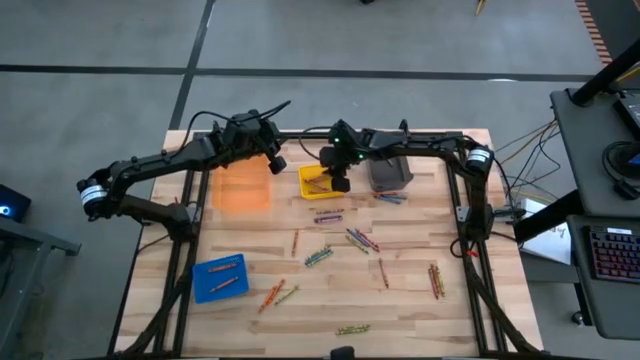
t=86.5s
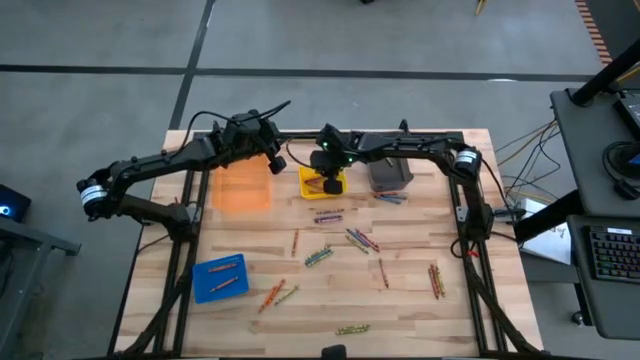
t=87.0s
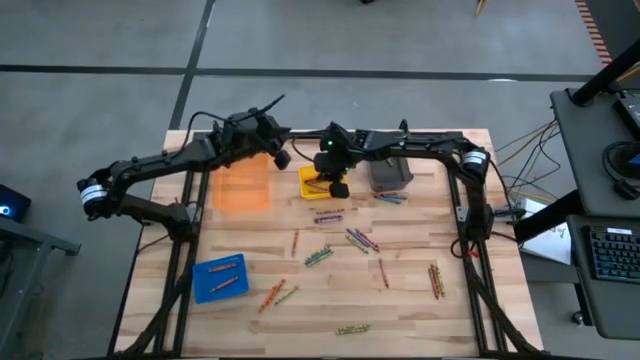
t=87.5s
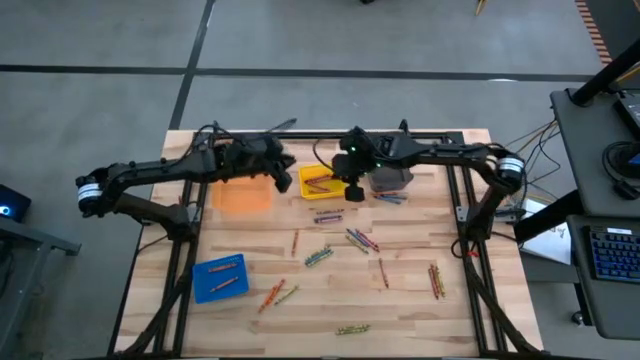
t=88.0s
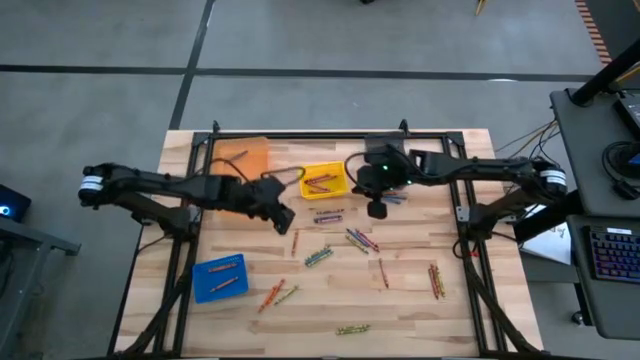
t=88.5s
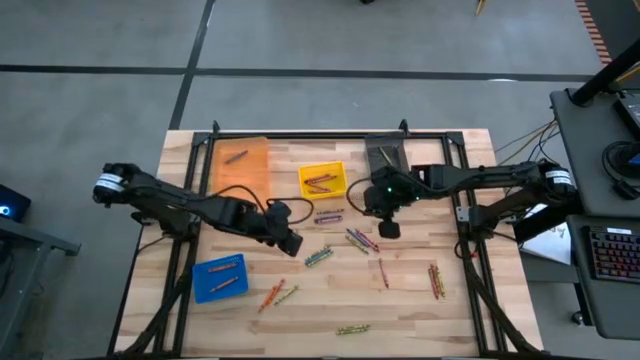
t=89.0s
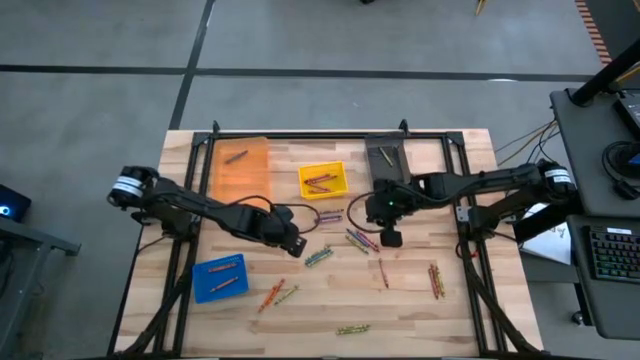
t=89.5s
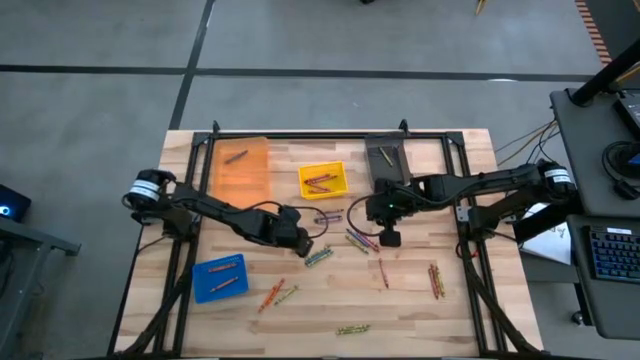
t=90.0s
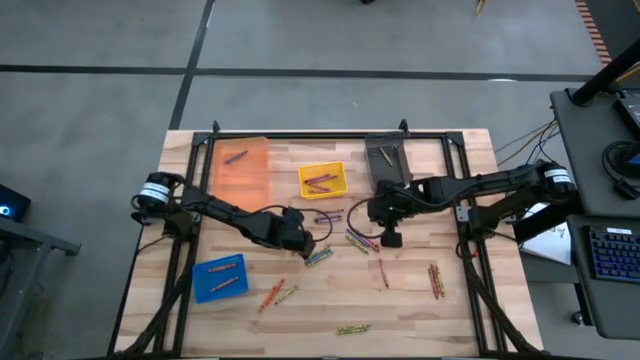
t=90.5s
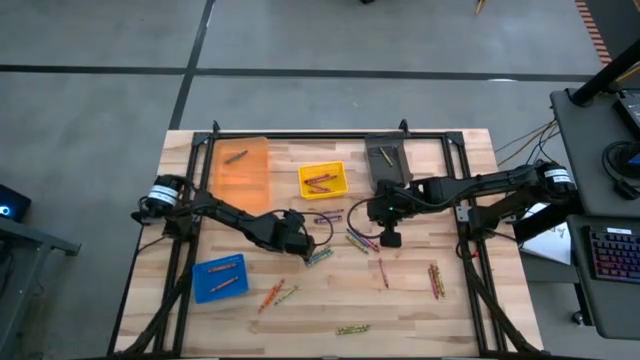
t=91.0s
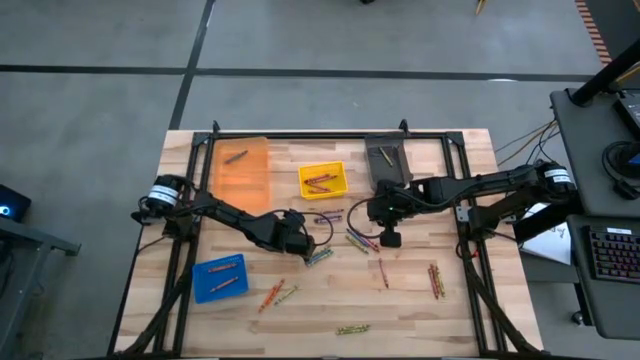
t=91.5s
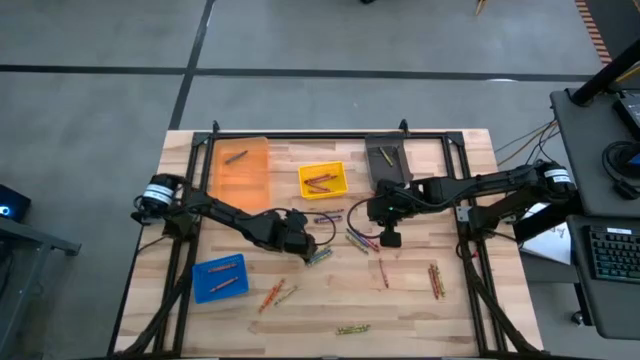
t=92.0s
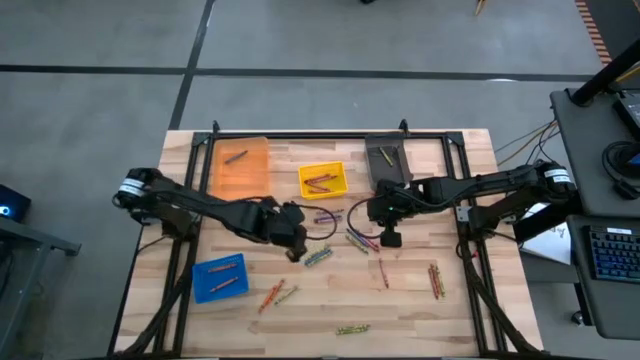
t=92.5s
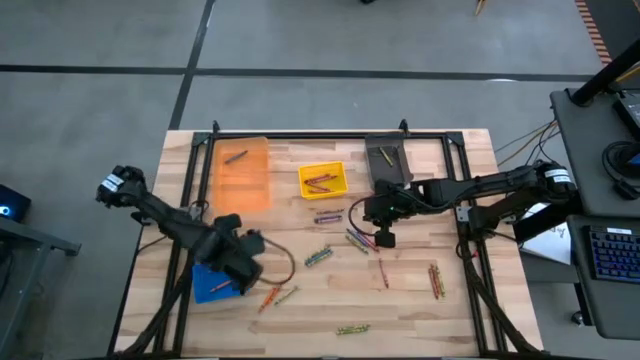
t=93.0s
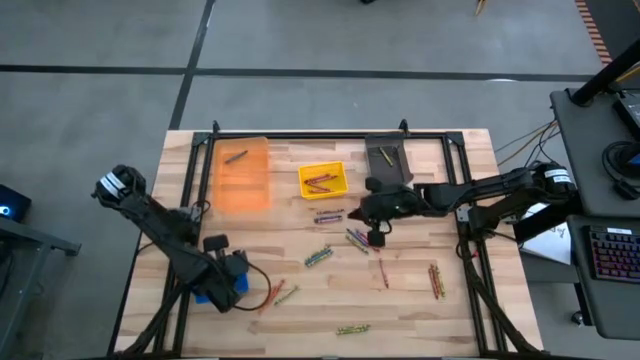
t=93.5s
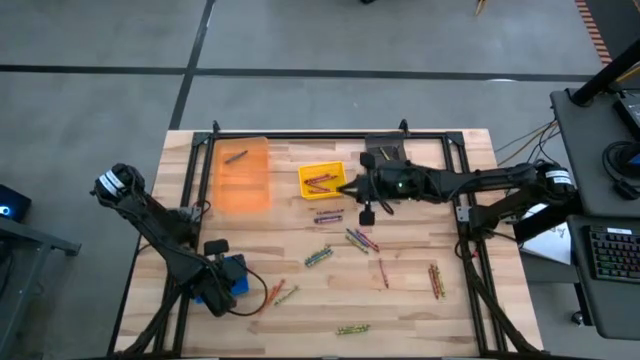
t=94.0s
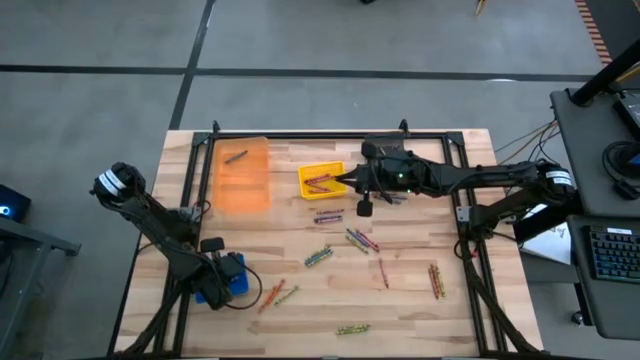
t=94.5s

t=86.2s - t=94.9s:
Task: Sort crayons
Put the orange crayon into the blue bin

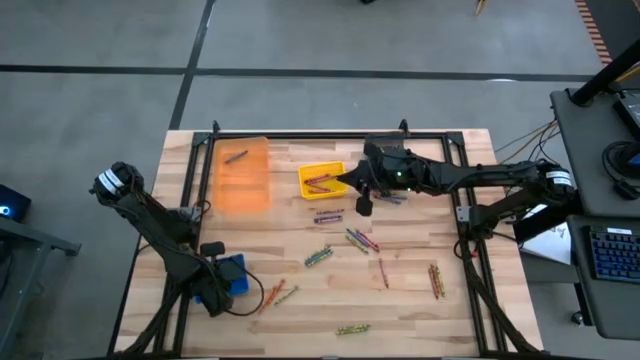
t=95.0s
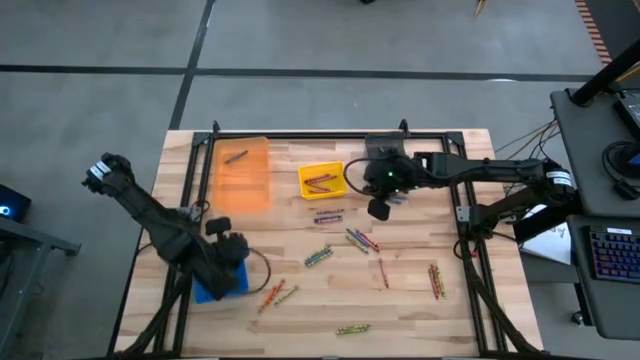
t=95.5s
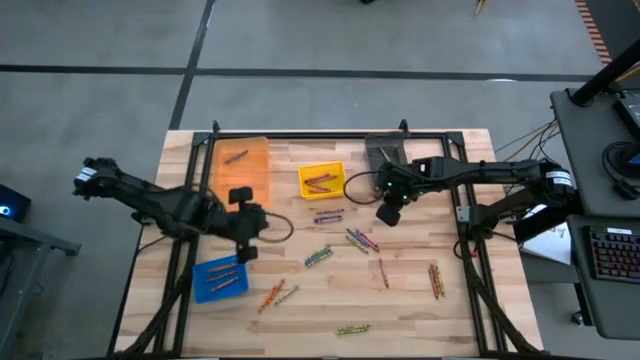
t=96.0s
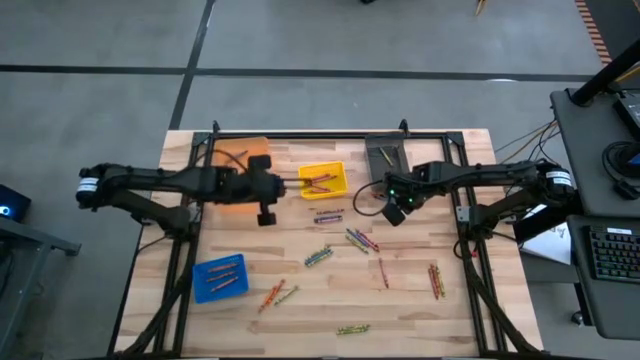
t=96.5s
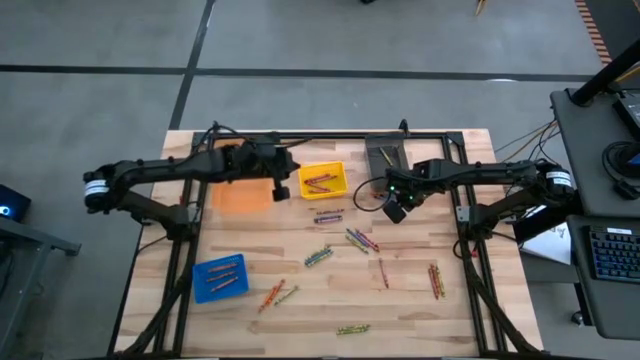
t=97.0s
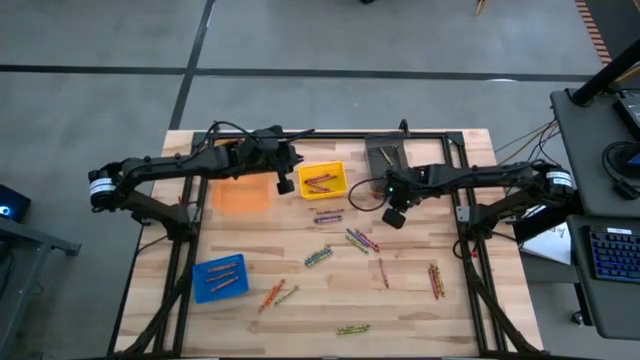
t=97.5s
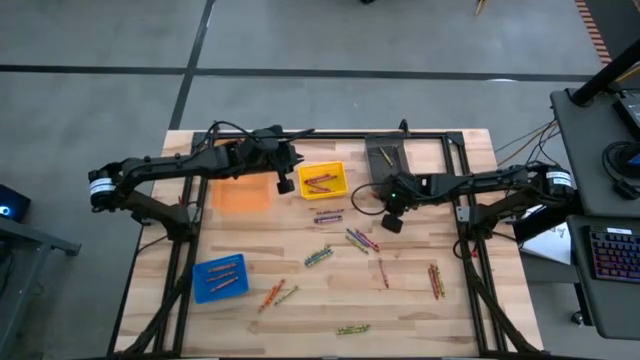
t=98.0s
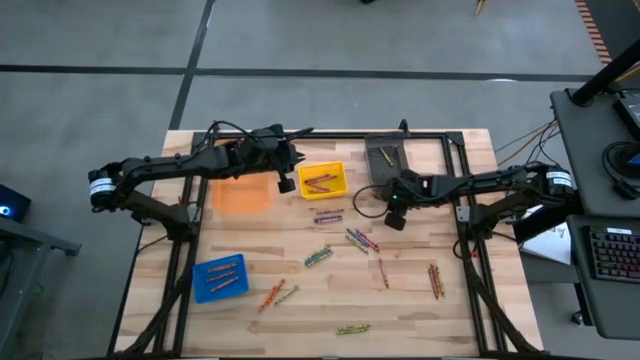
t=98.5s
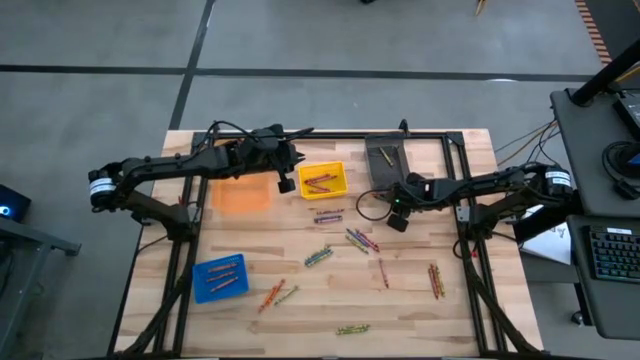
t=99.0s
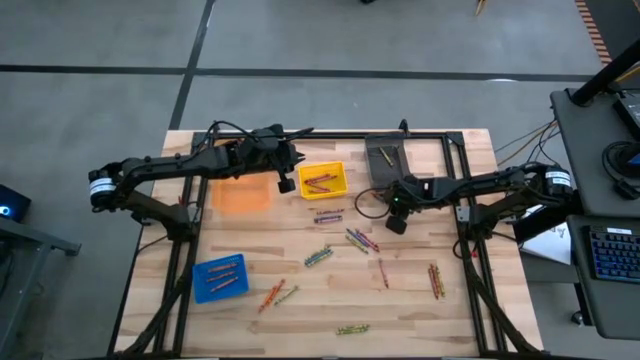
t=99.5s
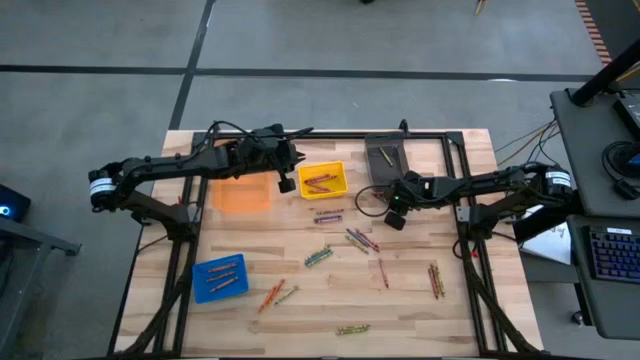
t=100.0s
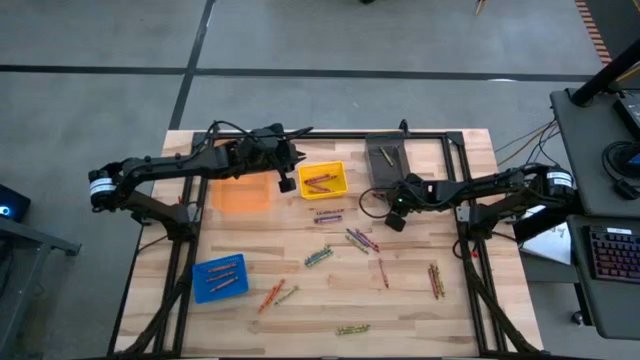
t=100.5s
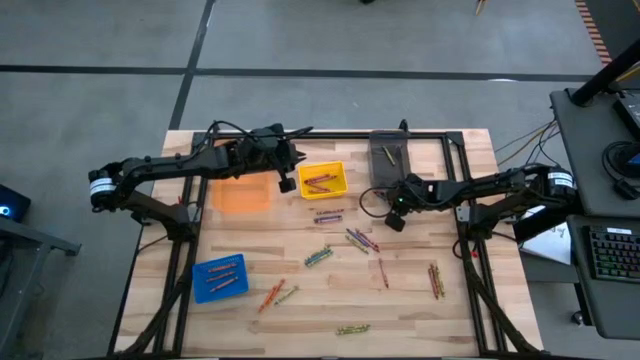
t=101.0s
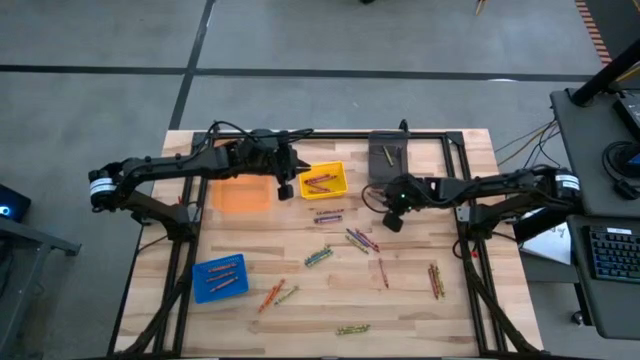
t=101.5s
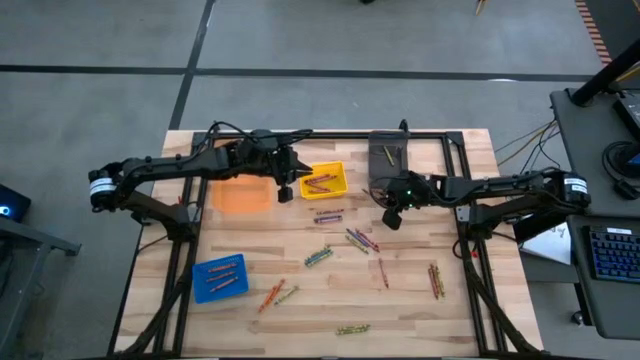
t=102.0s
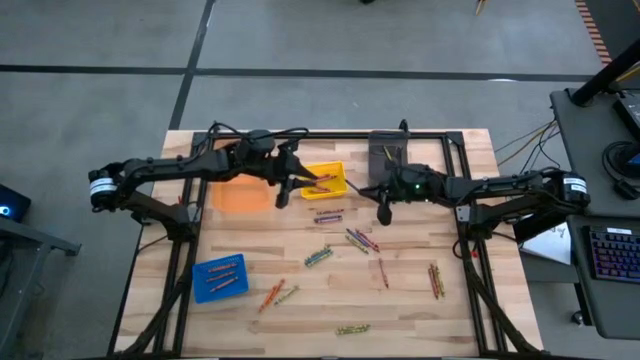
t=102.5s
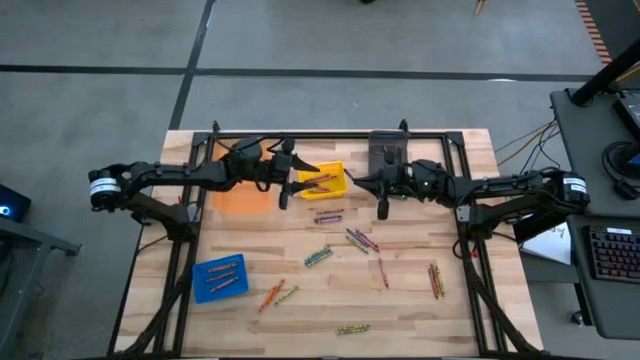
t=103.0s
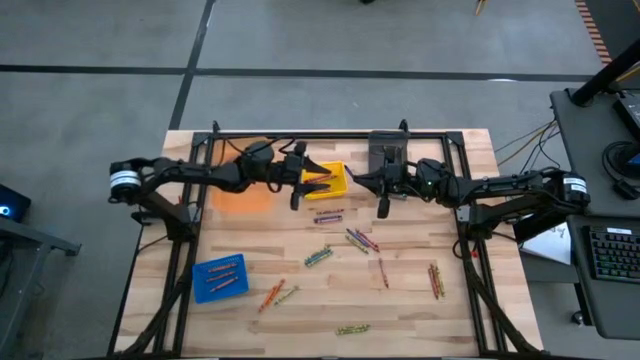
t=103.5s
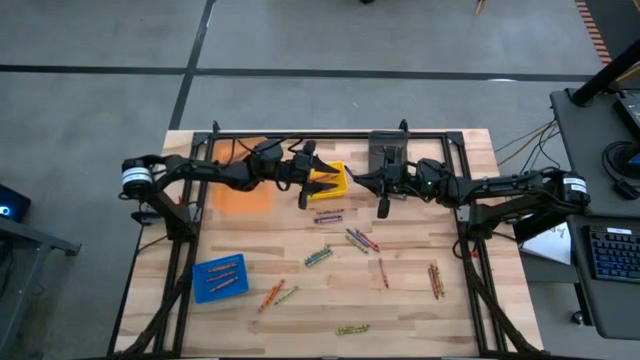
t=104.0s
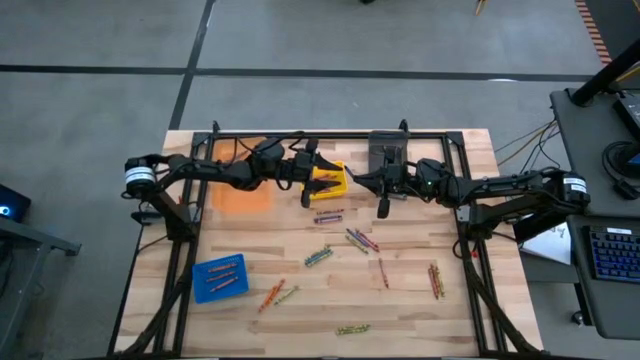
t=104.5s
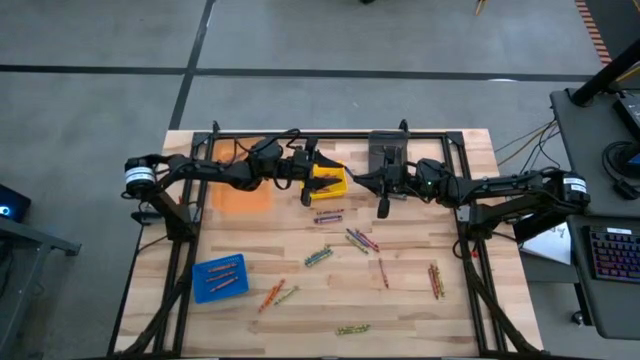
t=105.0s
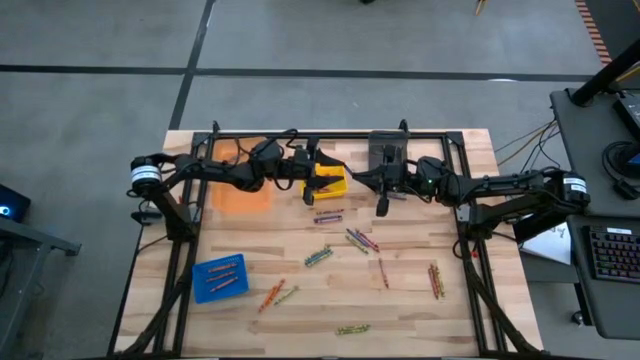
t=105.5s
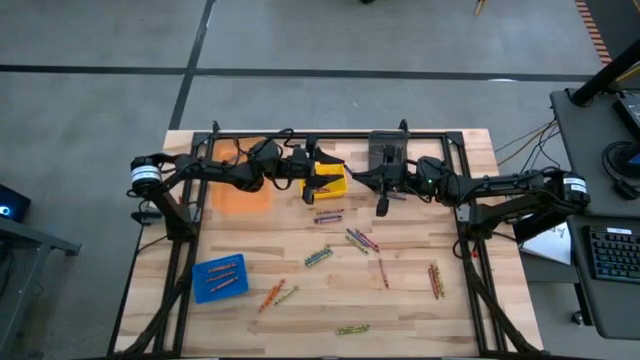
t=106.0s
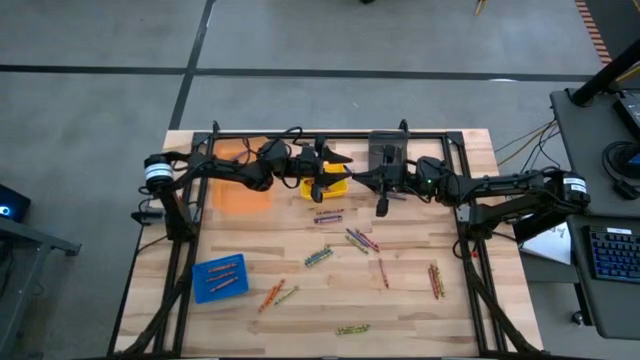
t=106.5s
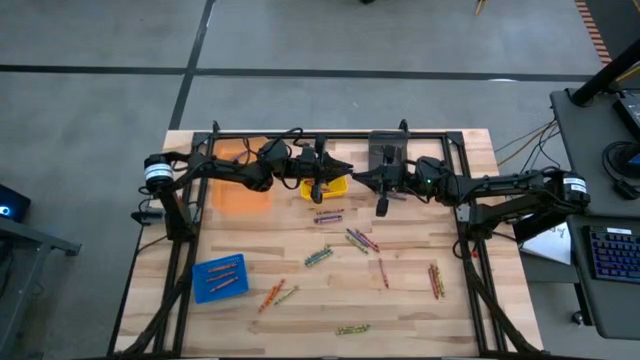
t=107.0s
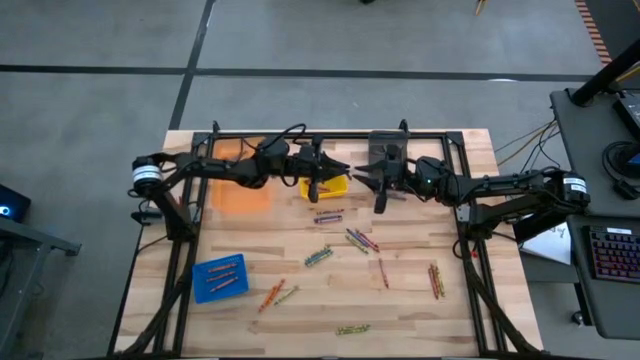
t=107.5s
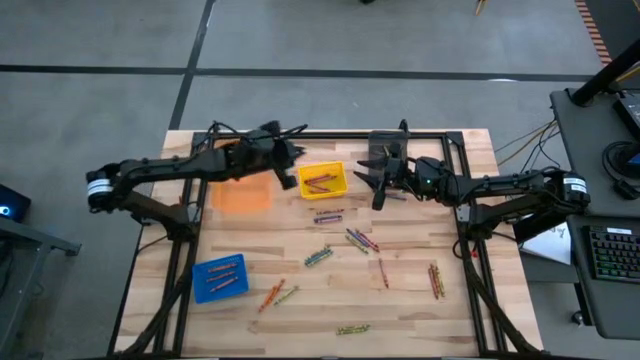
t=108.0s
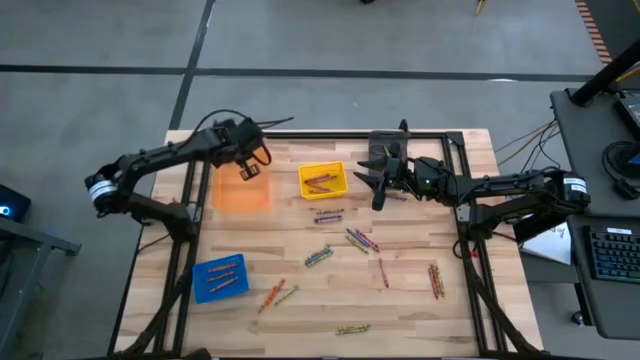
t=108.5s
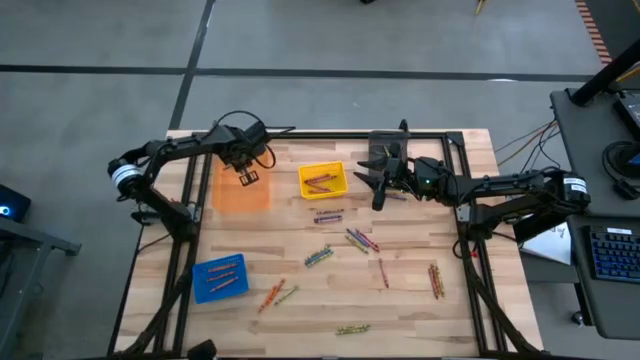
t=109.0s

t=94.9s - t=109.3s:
Put the blue crayon into the orange bin
